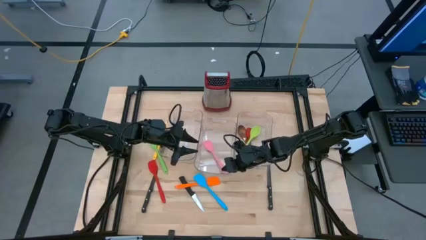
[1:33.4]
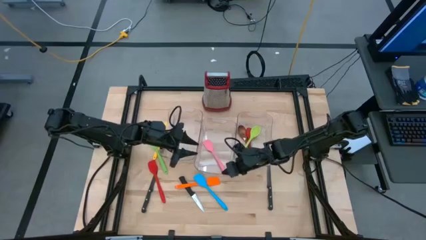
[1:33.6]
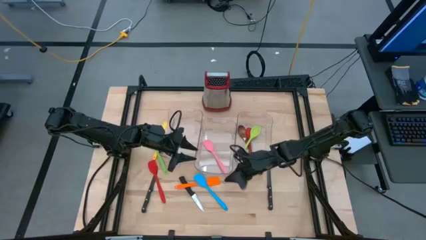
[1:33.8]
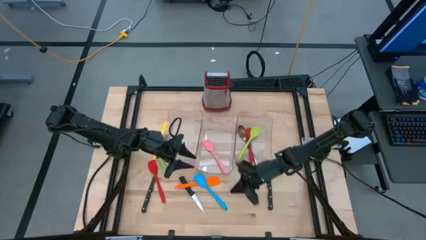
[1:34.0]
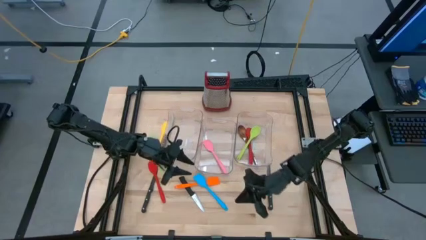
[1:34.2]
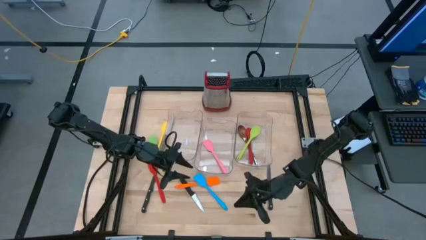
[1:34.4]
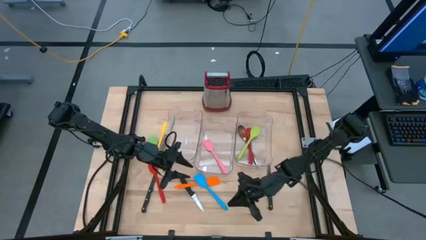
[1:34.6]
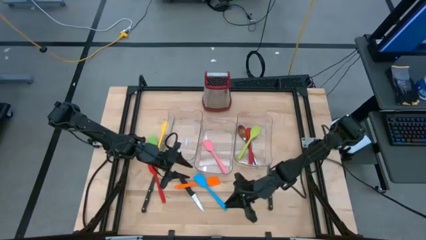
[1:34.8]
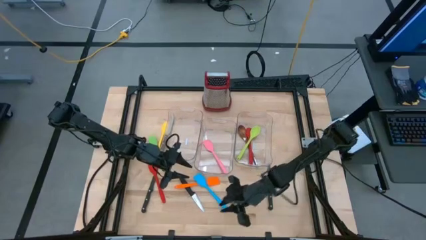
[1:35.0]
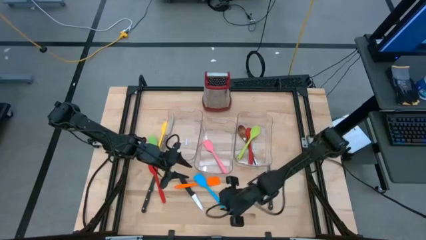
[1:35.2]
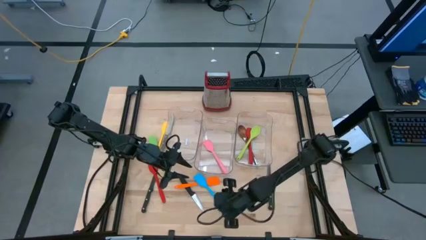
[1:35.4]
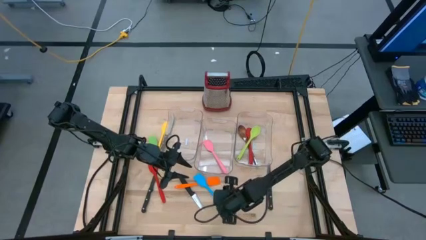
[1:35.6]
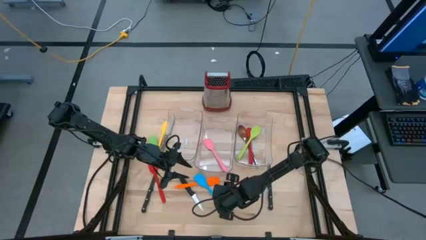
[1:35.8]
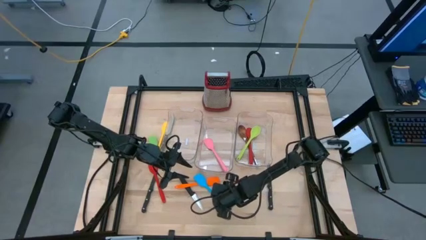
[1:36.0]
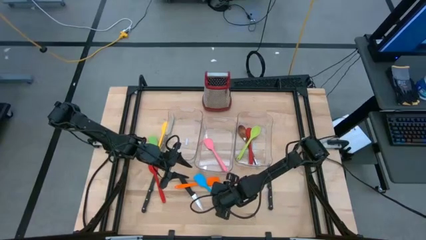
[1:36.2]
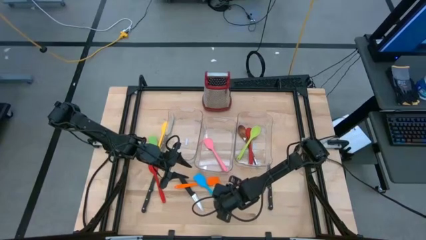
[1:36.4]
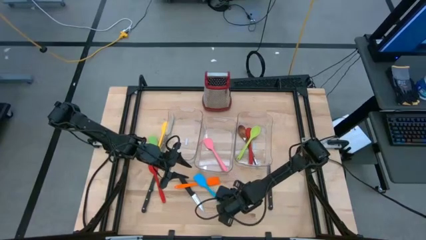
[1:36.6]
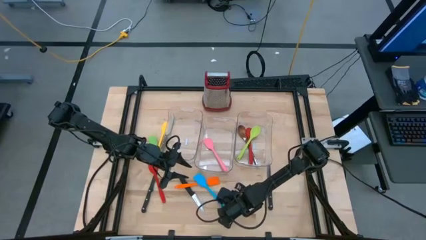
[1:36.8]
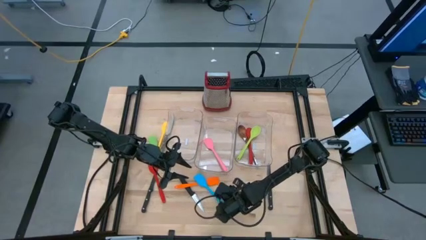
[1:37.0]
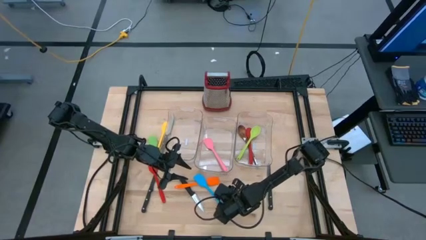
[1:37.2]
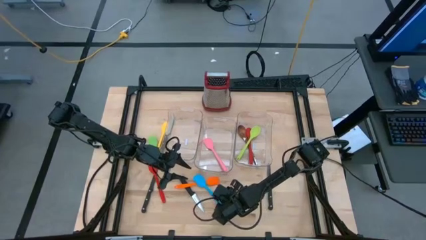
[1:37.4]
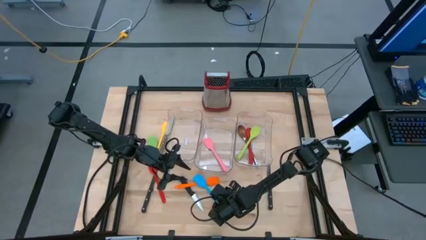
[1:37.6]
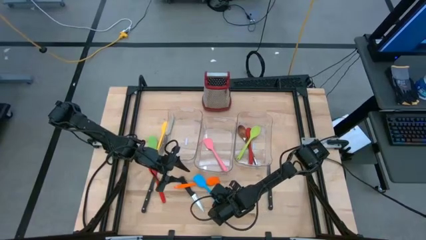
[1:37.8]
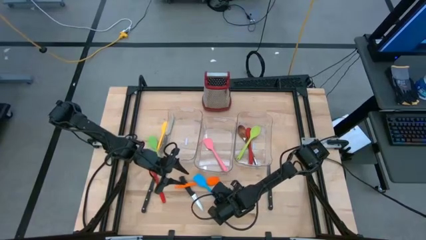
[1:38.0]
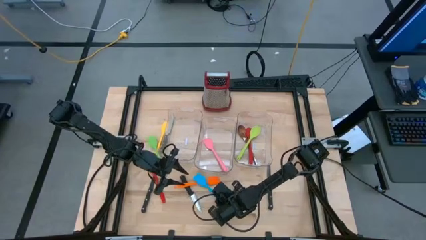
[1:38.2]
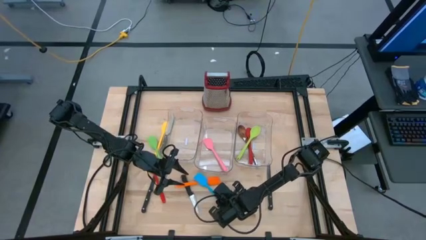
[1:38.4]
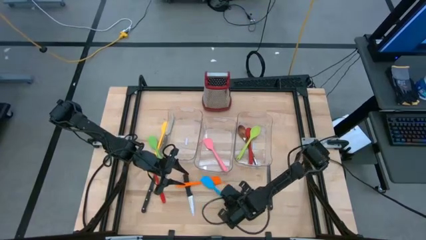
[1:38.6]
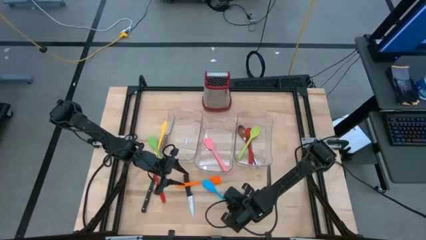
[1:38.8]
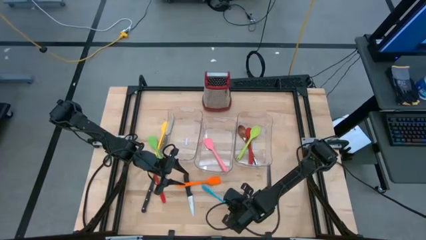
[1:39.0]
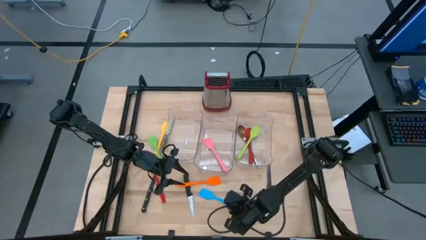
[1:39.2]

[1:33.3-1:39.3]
Task: Pick & Place Kitchen Items
Put the blue spatula into the middle transparent bin

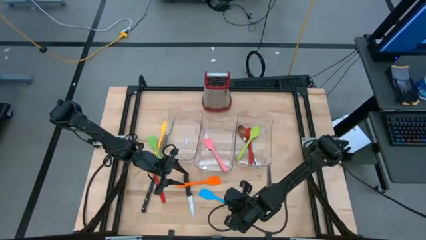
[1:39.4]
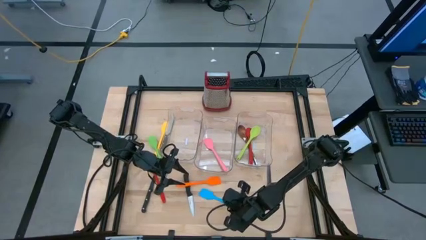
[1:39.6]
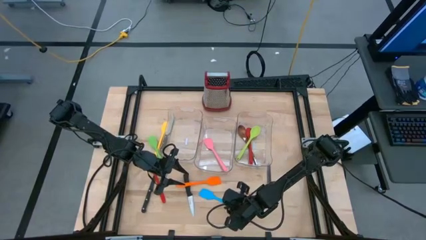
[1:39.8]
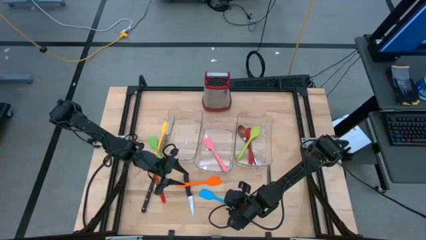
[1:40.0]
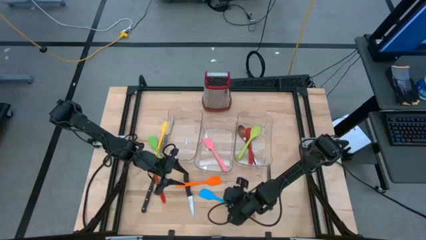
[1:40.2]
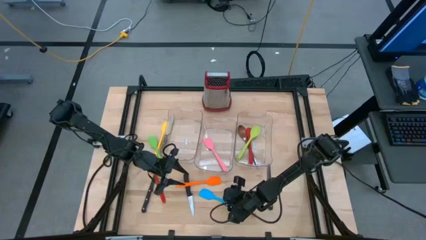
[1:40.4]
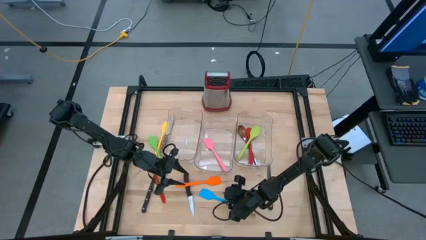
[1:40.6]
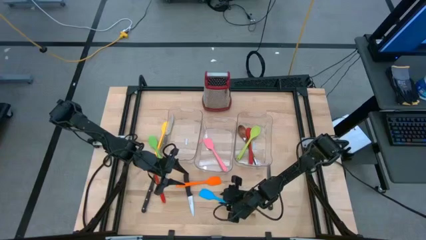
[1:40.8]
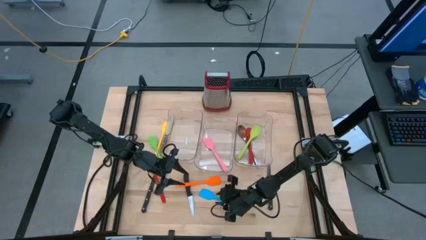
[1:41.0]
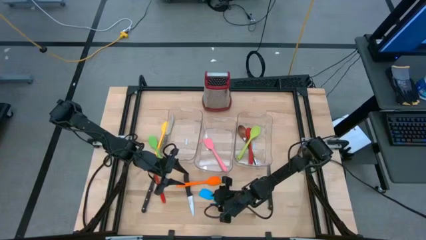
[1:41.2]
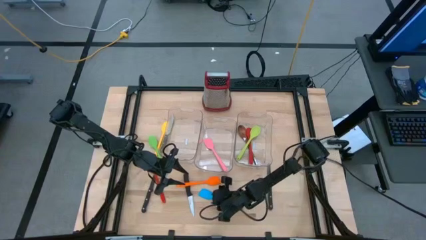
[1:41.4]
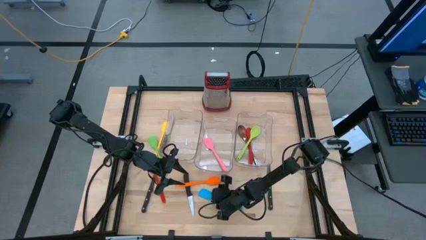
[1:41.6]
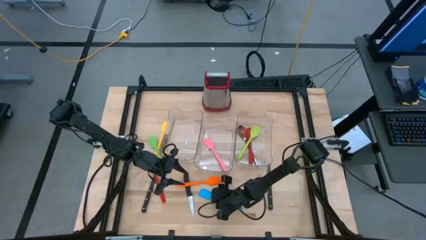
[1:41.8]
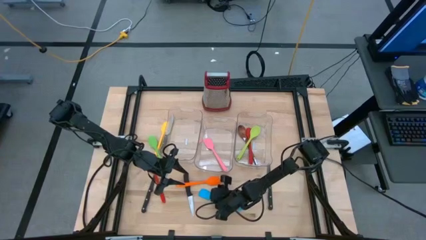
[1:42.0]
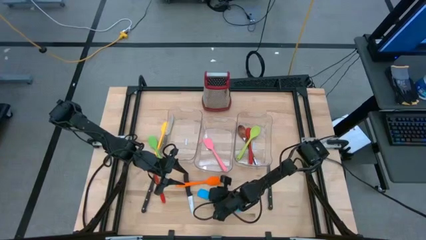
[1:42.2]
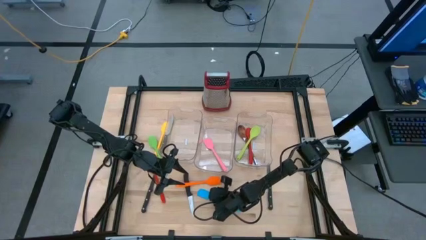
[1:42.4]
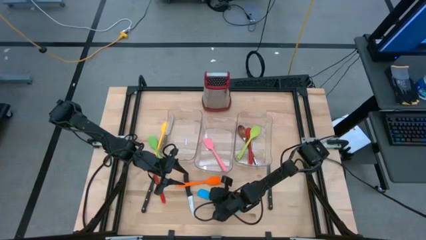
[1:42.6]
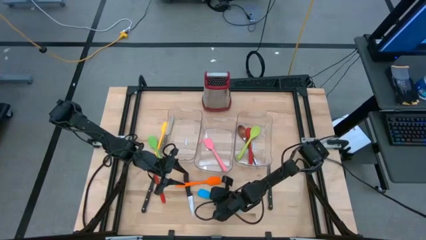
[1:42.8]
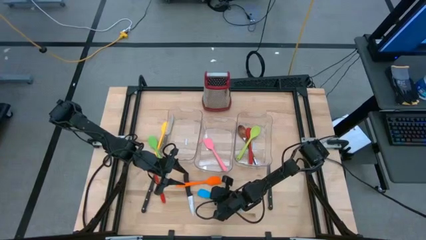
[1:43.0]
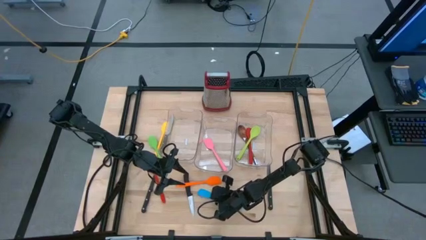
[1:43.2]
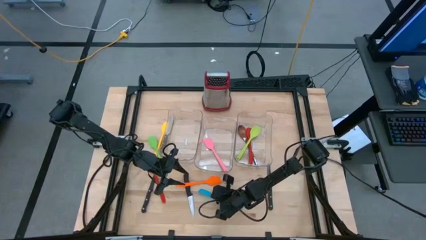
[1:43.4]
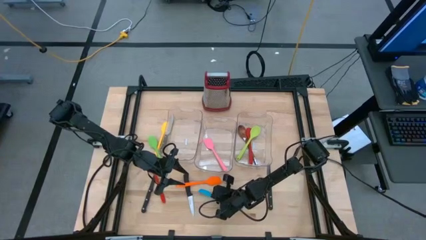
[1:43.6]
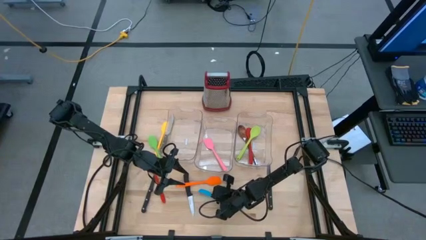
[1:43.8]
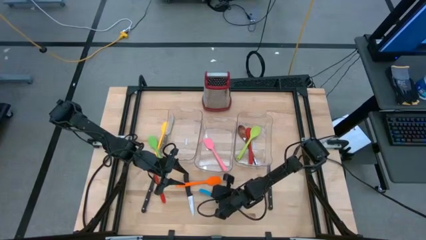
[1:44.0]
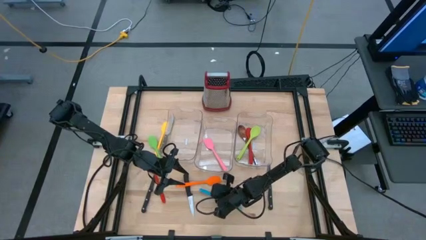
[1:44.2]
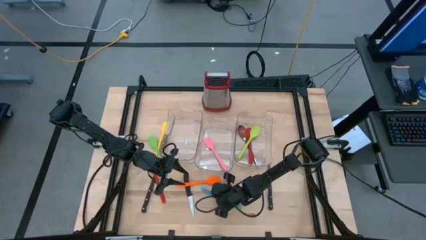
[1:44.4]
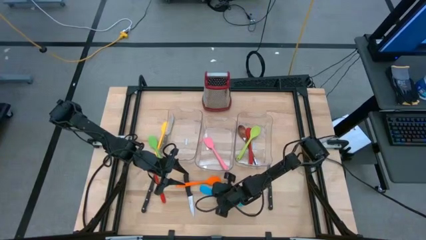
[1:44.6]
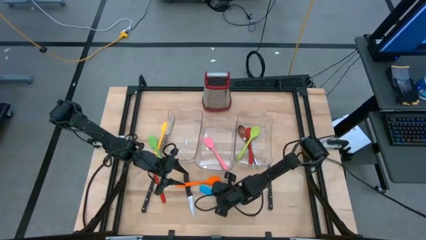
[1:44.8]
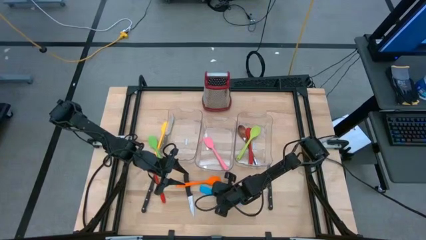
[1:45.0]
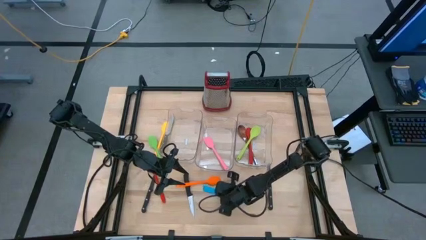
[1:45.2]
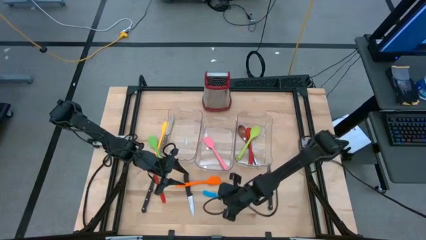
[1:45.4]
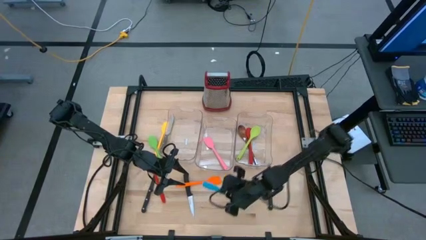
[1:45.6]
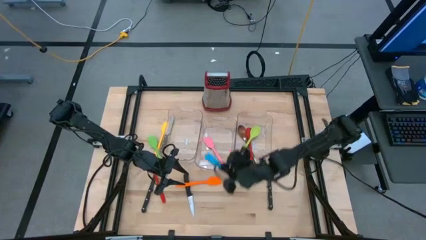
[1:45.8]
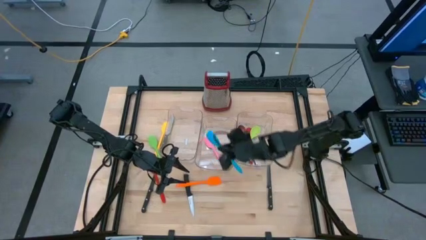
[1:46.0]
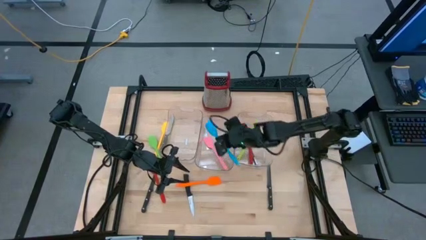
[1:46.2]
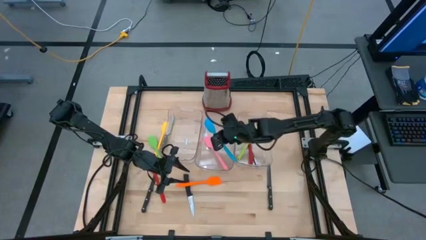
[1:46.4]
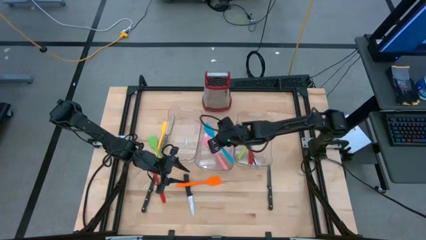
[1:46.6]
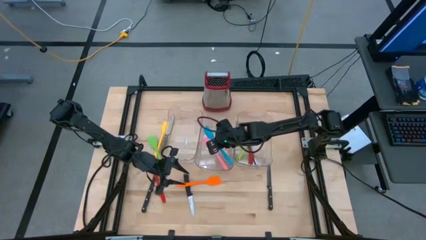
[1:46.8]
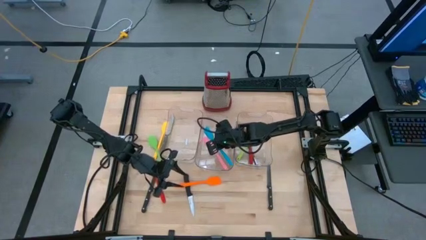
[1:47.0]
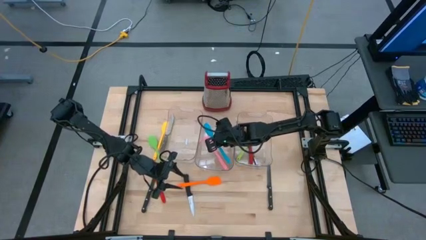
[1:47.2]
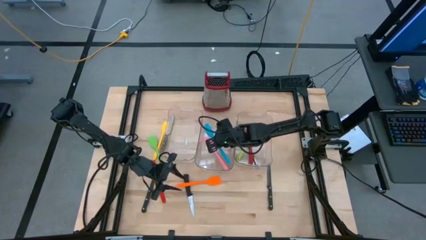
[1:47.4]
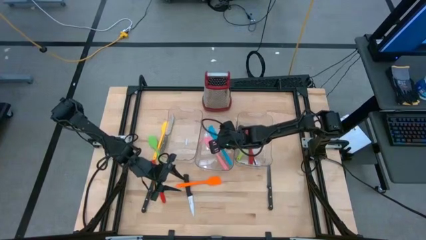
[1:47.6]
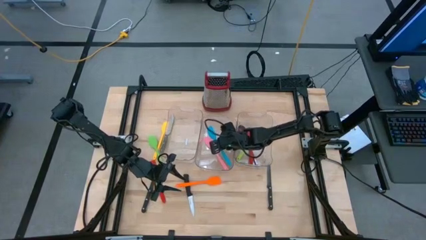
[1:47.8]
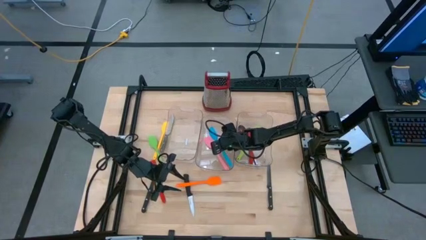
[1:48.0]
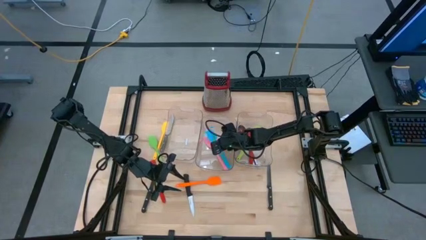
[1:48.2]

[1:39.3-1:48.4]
Put the blue spatula into the middle transparent bin

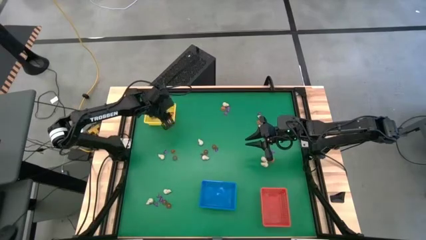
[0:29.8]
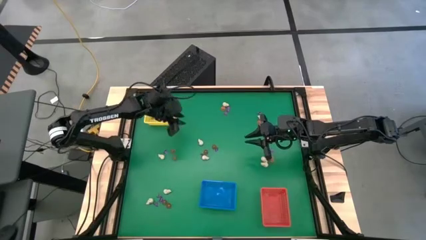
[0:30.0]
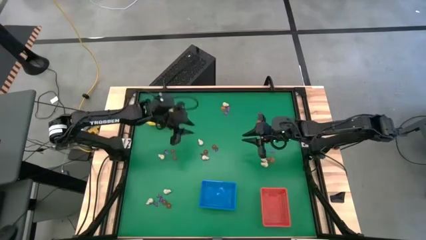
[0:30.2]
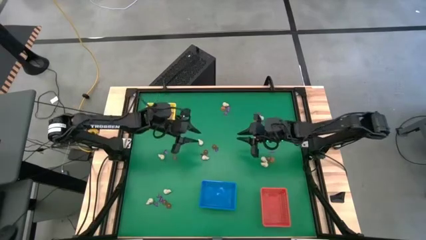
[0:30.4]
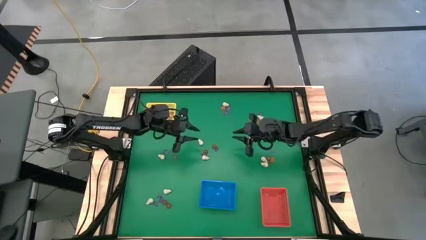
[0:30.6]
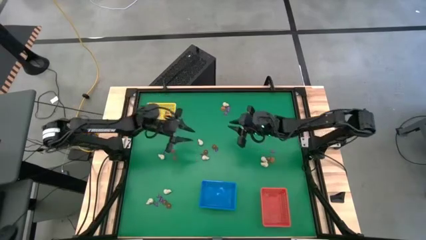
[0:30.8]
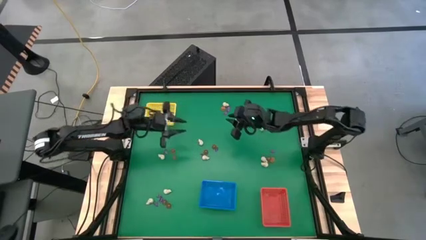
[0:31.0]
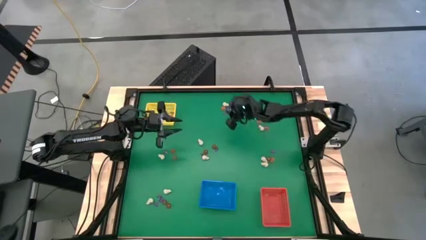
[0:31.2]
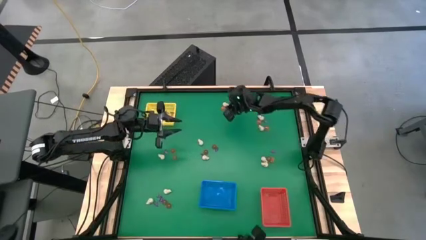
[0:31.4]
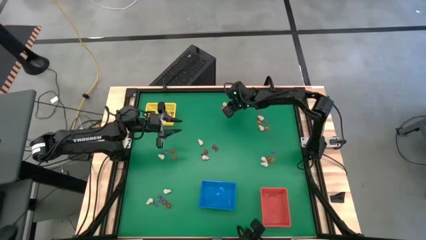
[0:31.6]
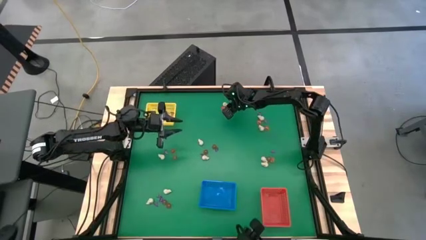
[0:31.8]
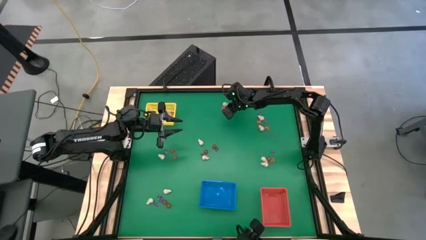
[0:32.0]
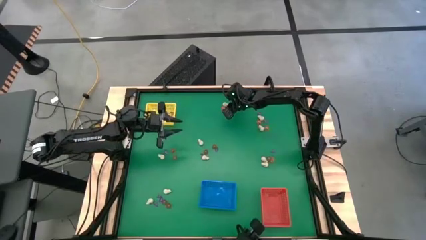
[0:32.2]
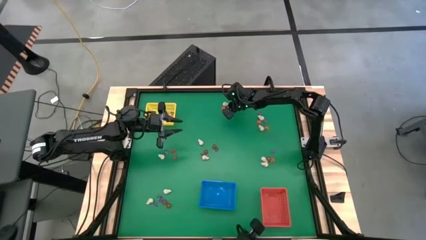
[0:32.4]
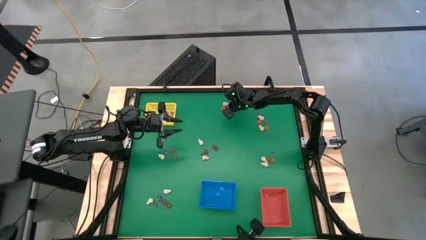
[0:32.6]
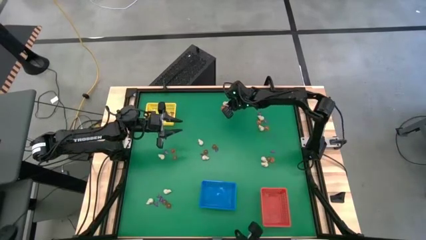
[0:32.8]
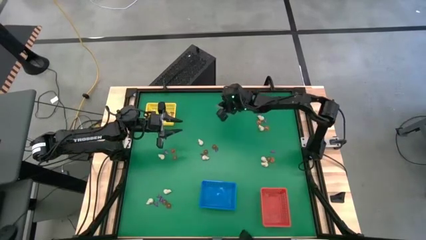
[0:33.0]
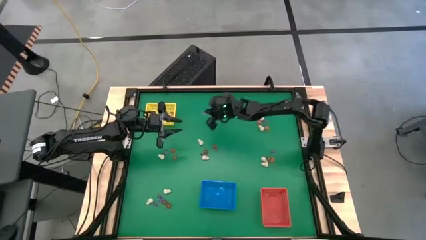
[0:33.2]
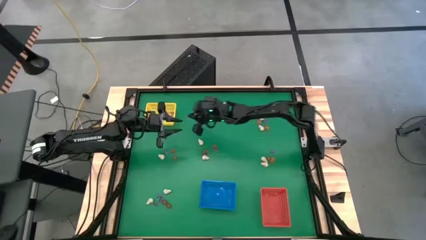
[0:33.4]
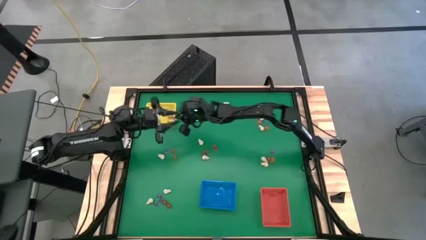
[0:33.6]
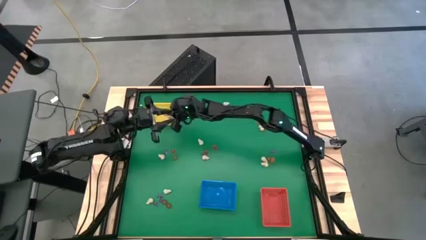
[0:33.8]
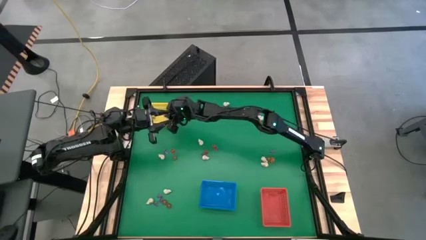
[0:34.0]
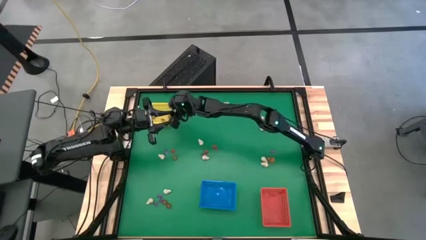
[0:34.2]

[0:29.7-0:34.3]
Task: Sort Halloween decoration
Put the purple witch hat toy into the yellow basket
